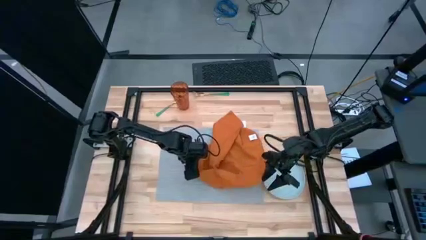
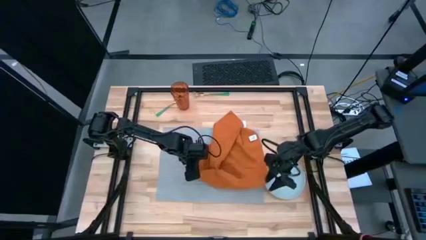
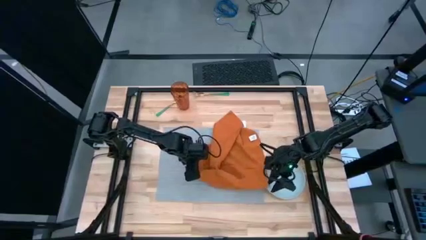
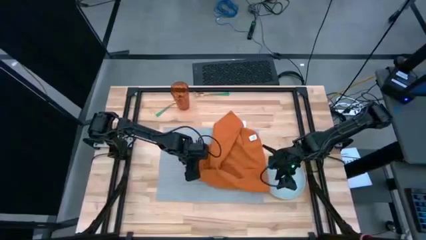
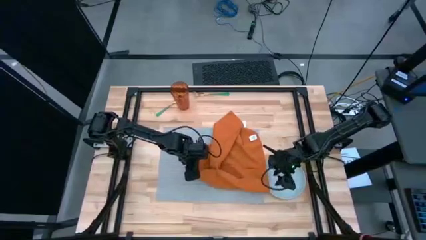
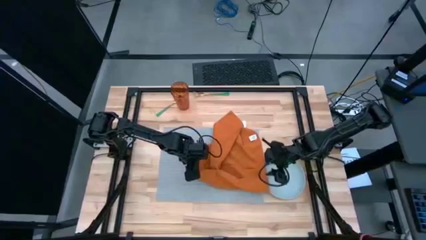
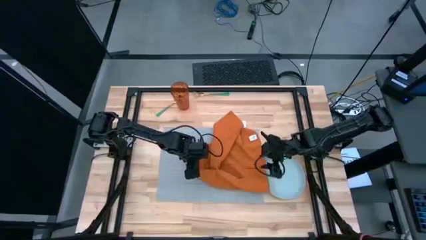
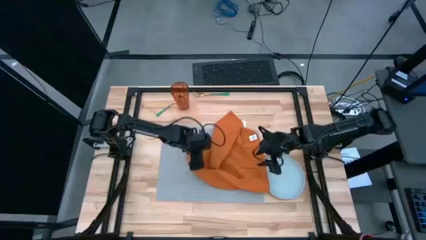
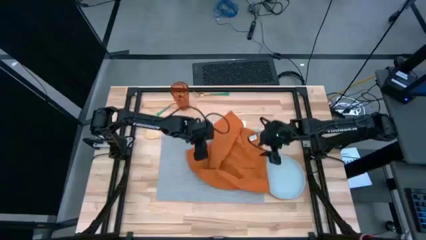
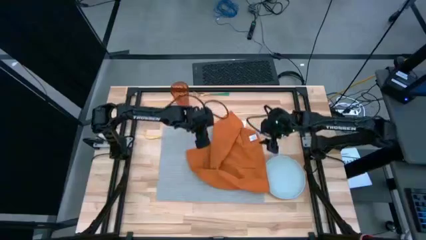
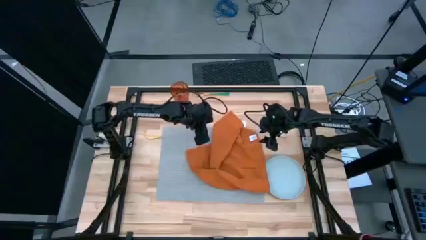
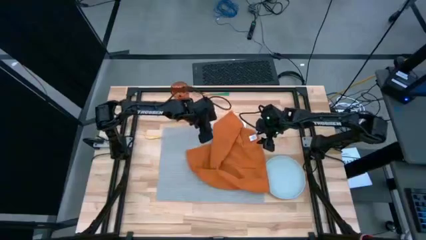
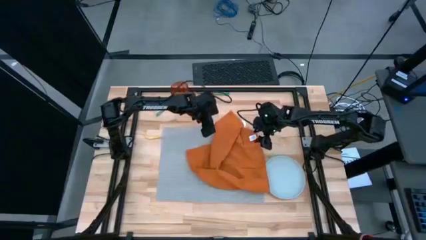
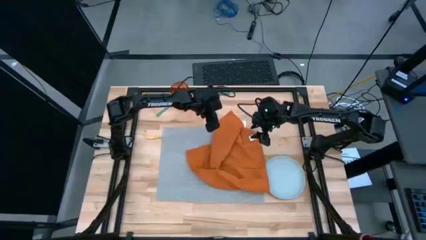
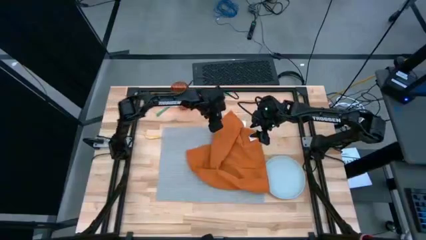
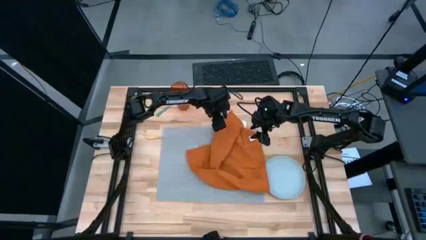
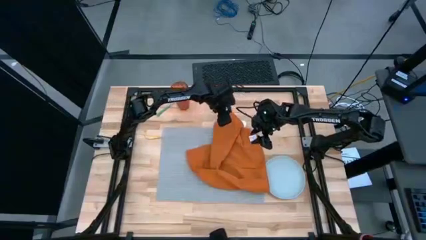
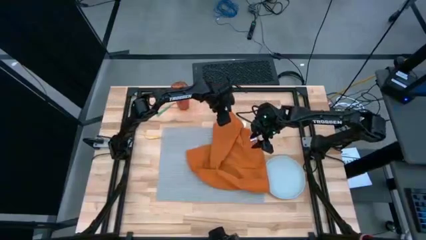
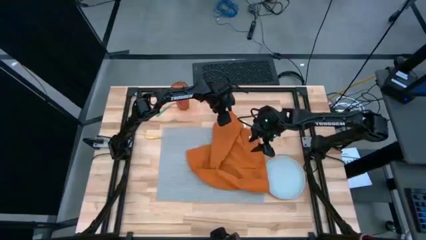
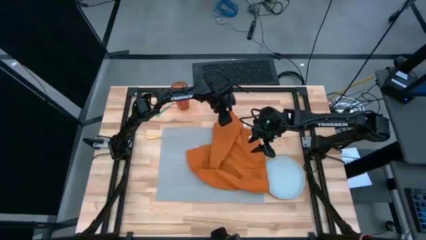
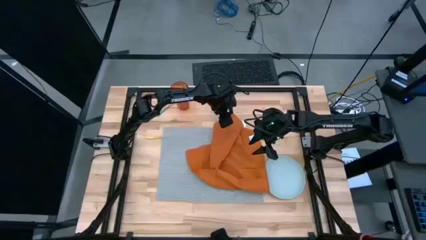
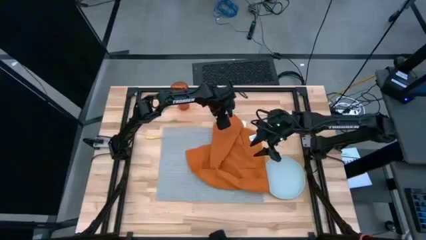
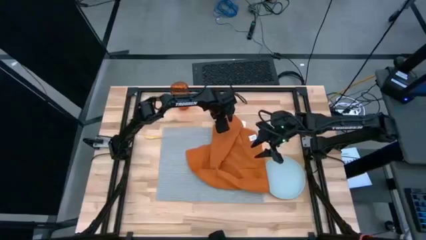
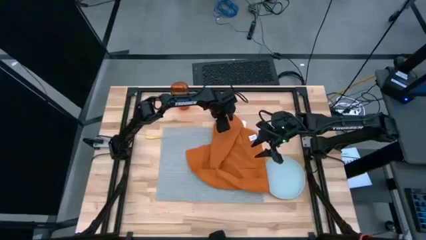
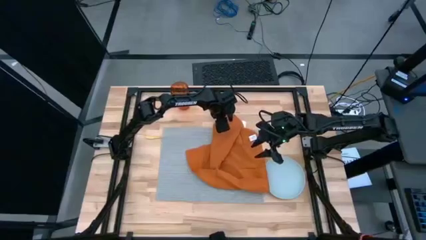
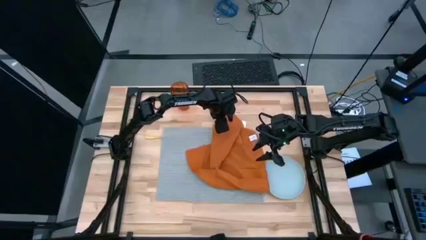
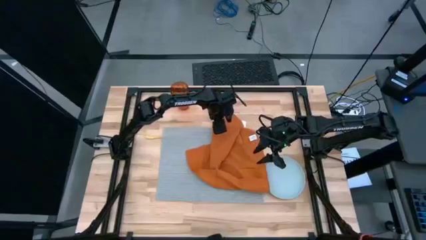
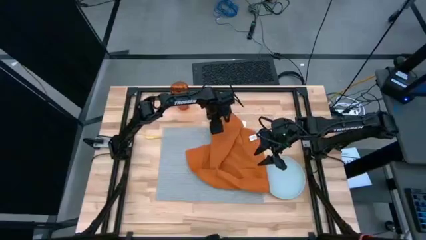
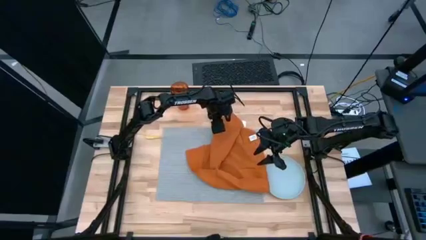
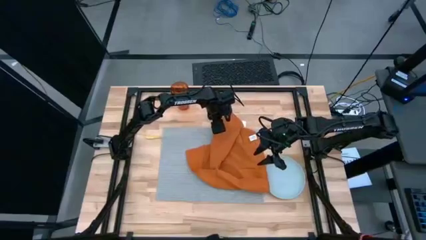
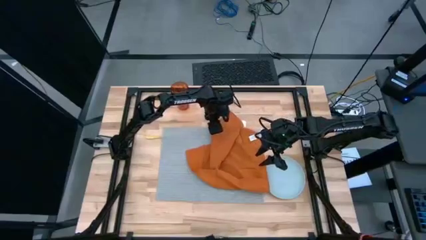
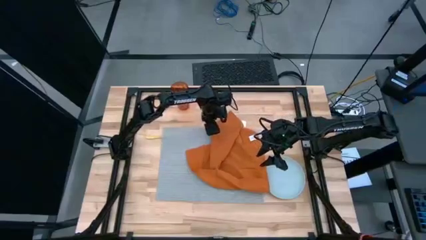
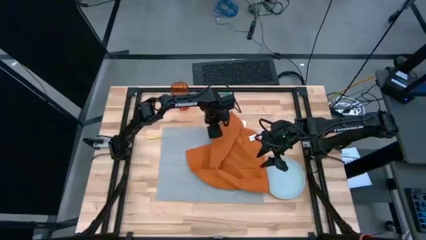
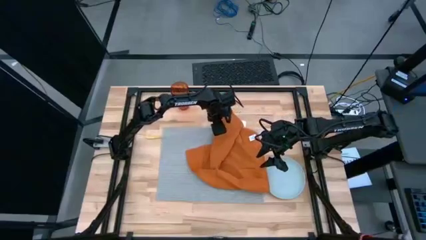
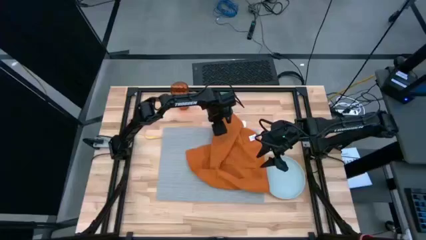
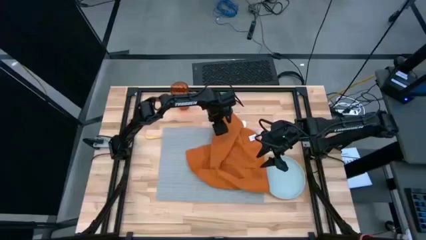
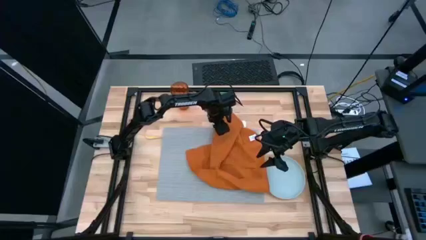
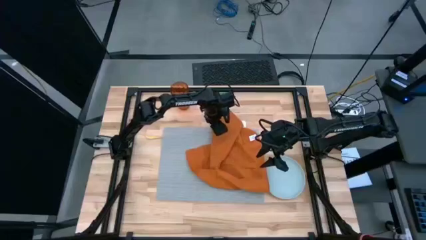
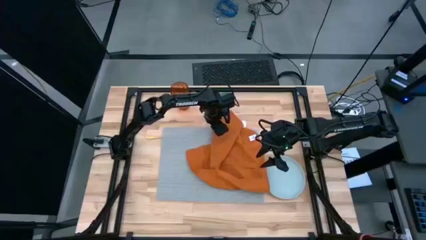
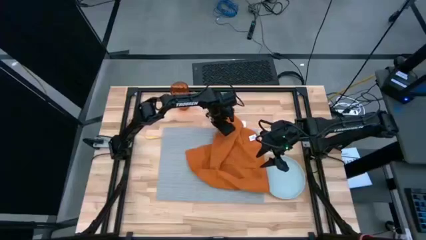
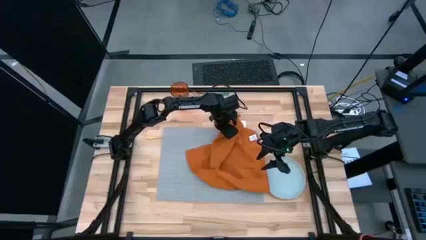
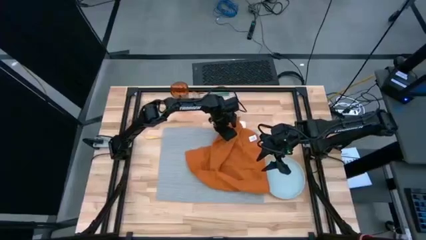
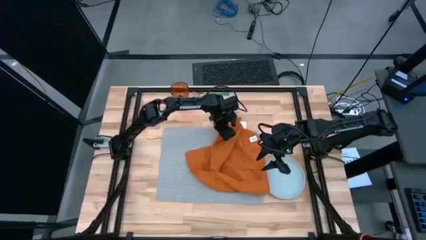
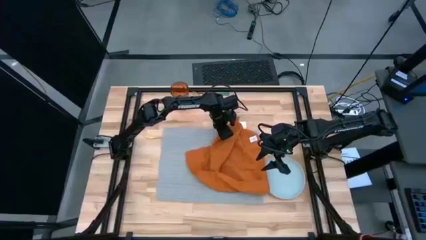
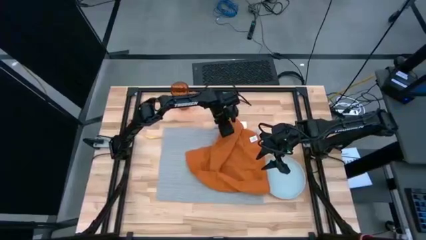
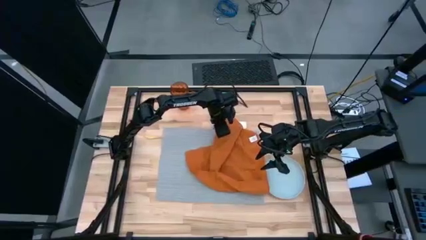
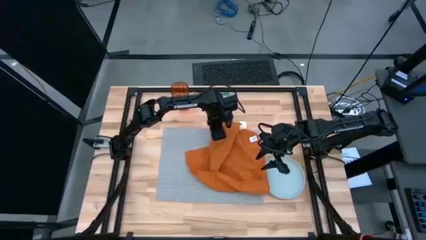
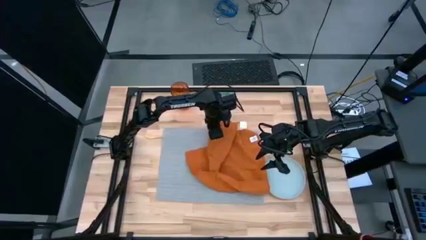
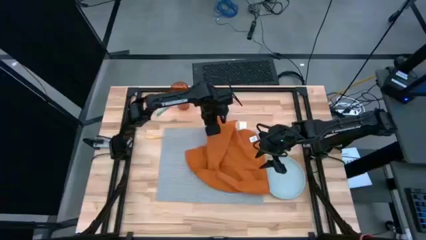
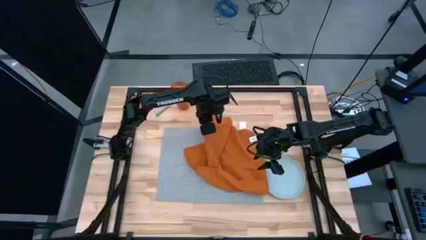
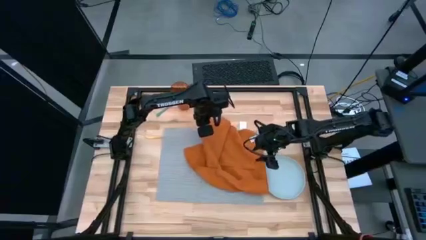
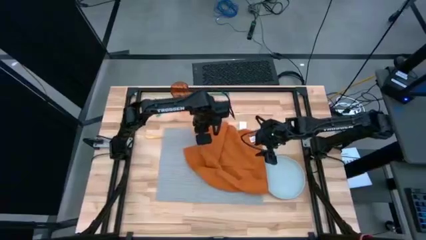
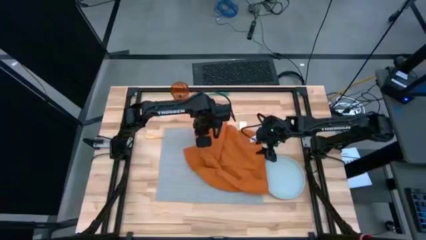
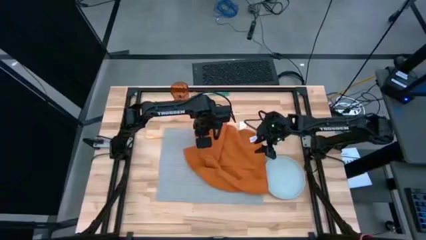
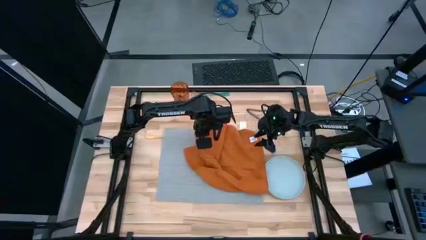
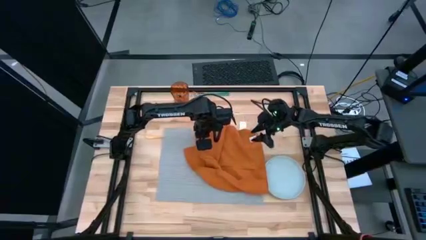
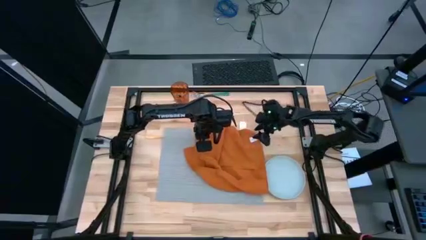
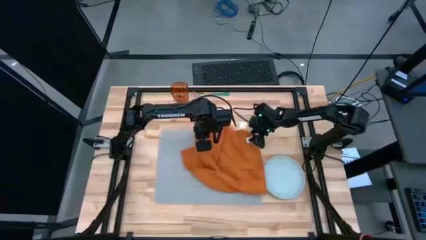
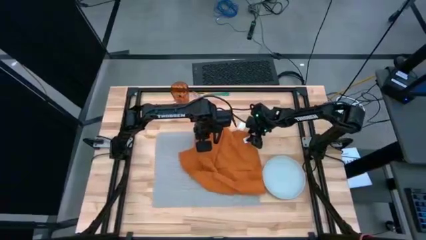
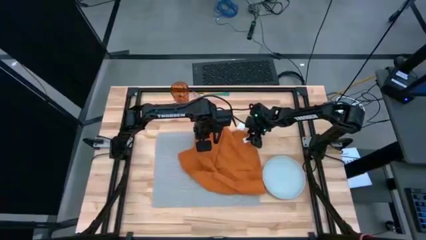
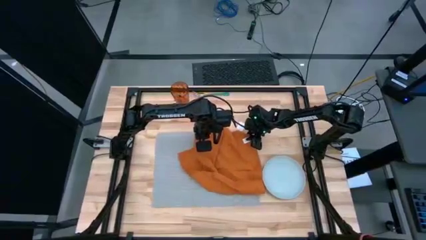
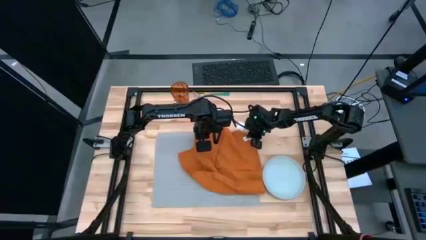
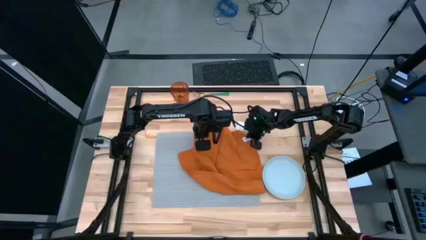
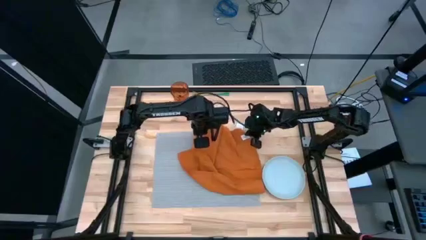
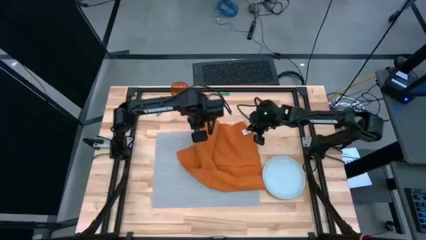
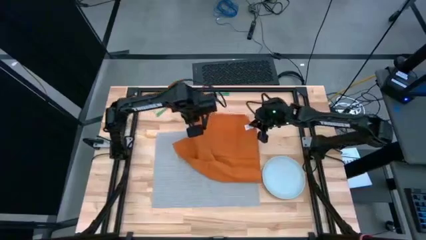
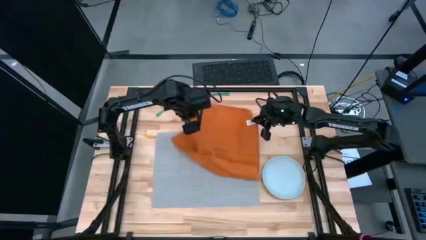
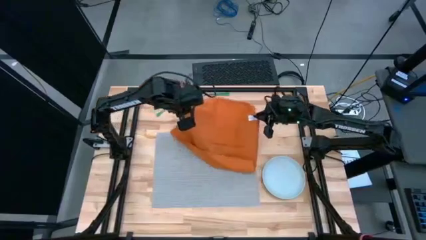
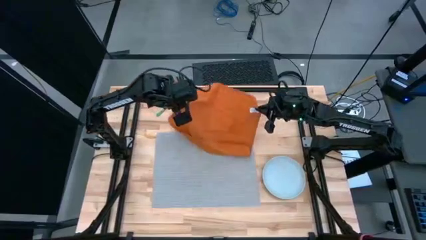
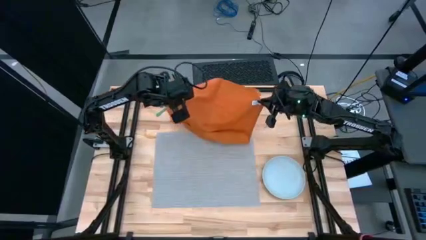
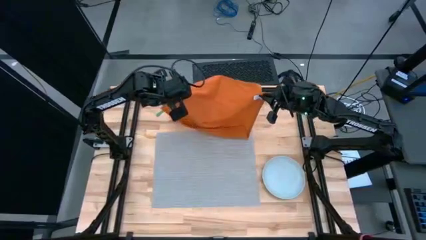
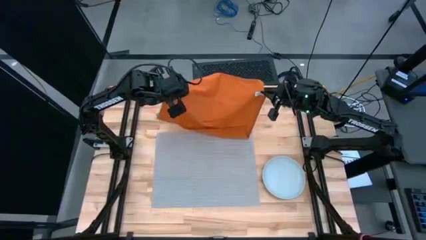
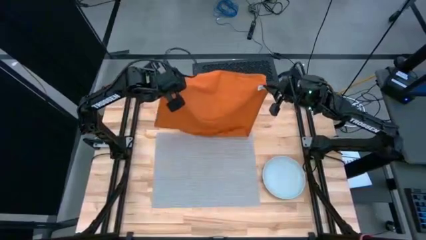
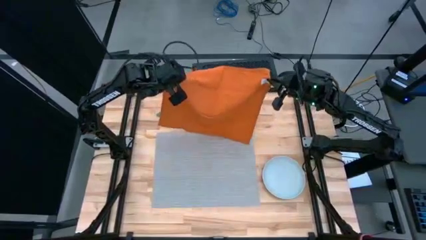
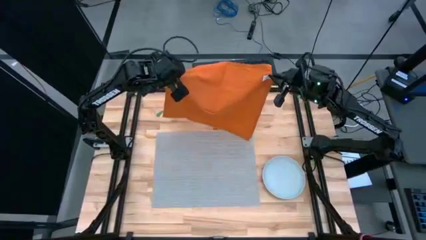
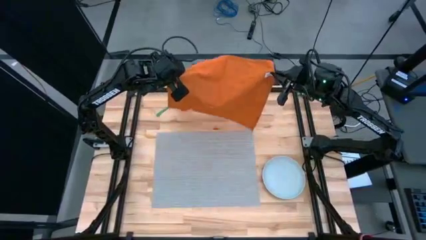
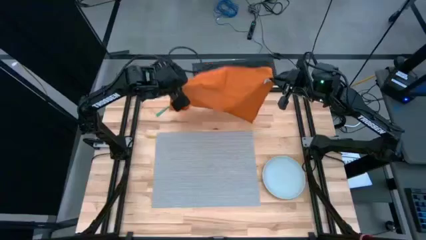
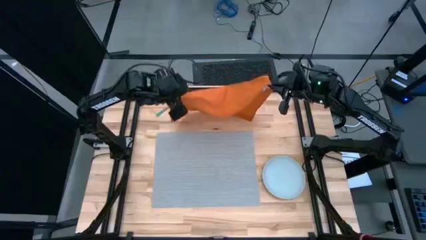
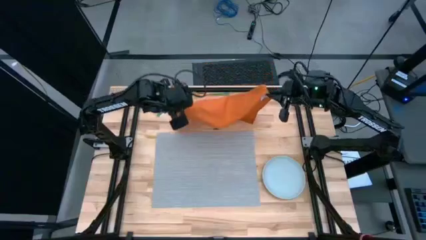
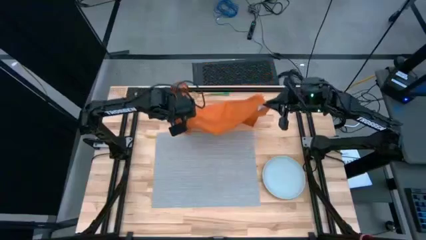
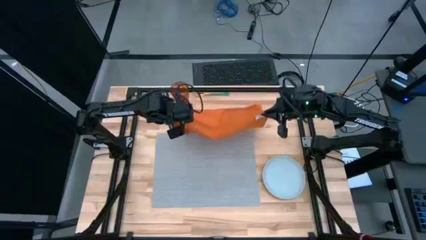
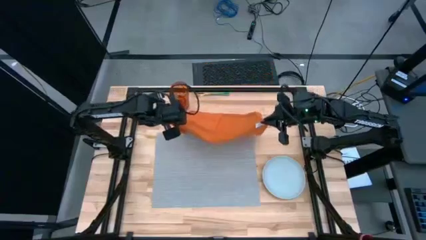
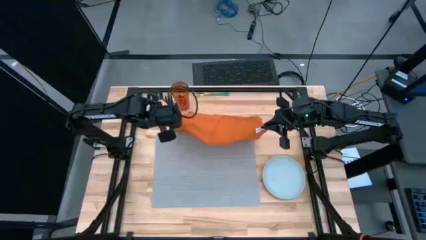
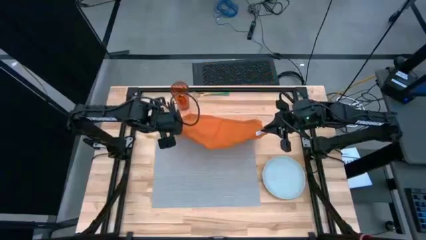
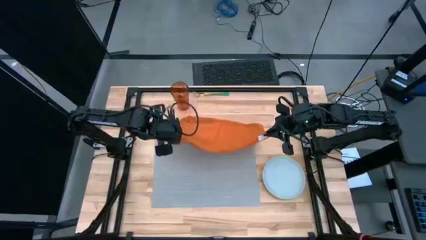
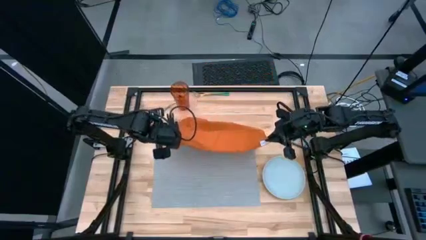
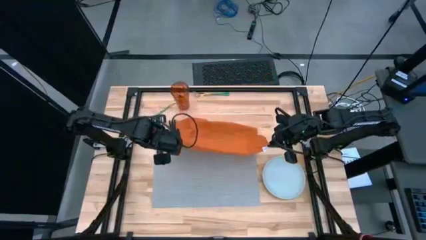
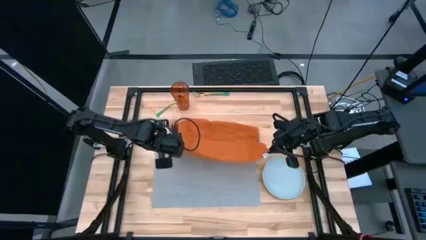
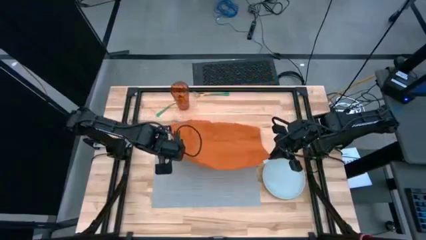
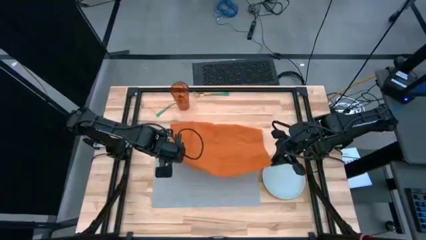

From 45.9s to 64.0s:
Task: Set table place
Fold the orange table napkin
